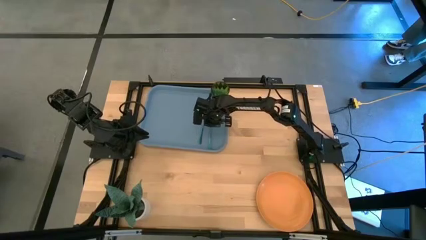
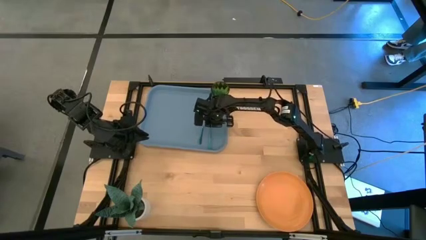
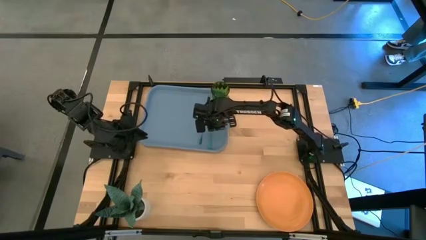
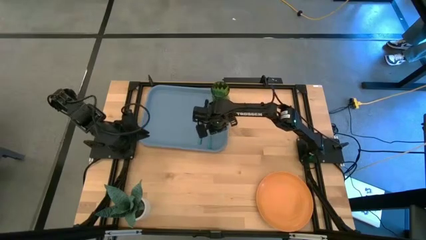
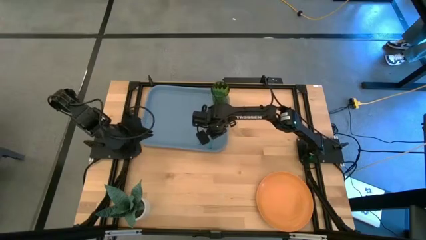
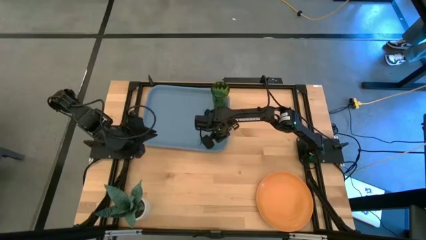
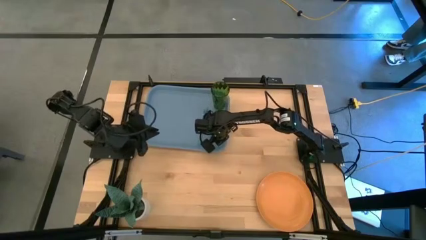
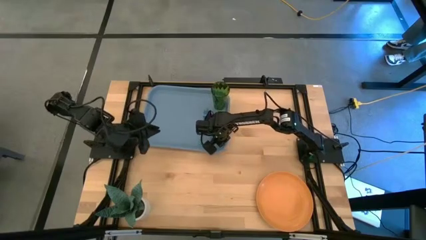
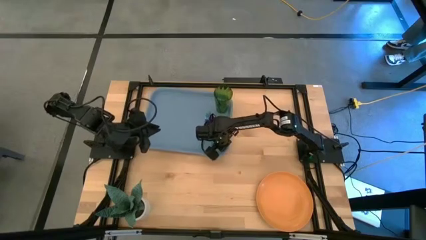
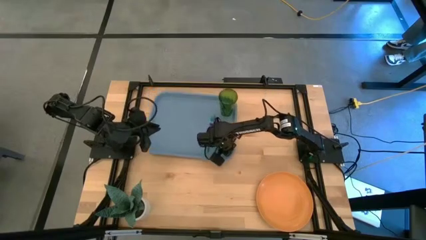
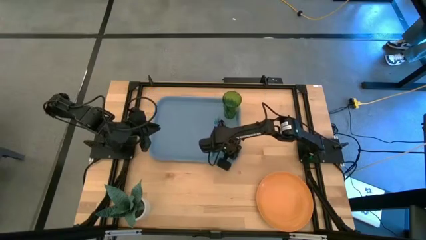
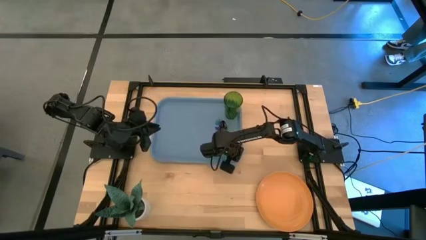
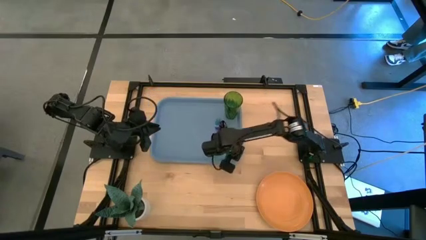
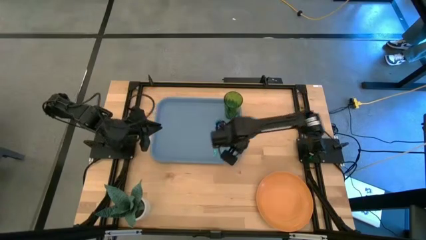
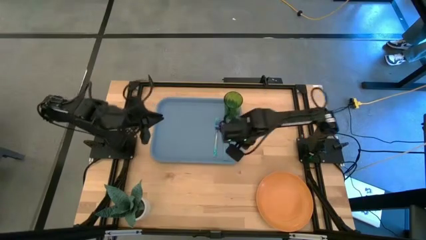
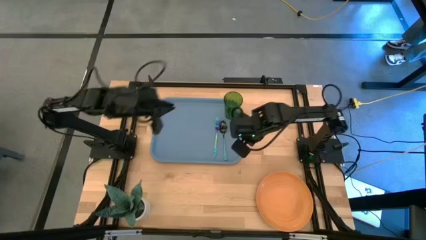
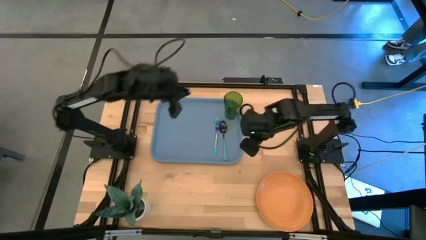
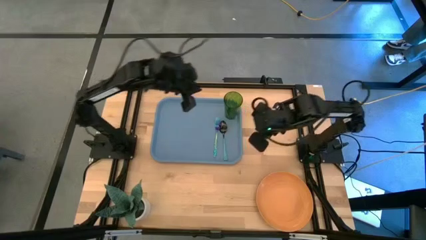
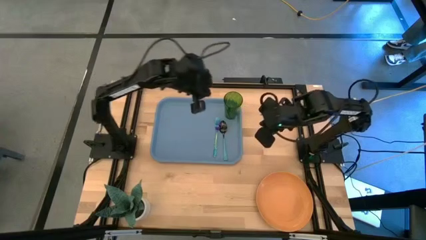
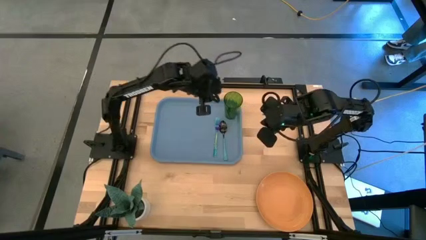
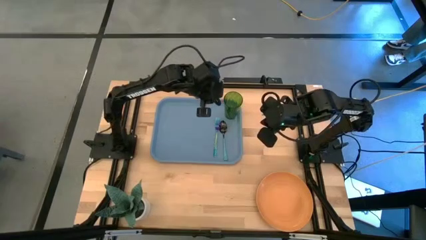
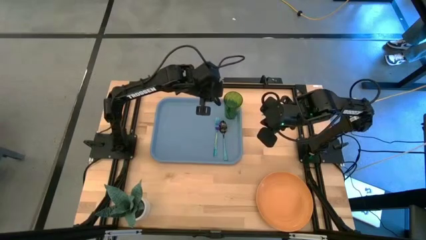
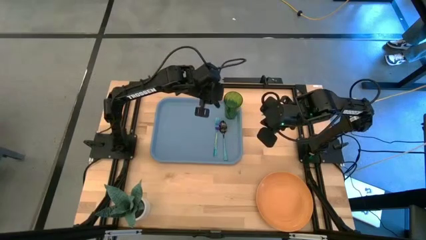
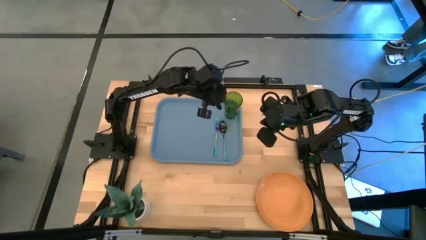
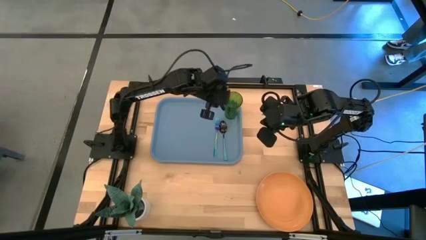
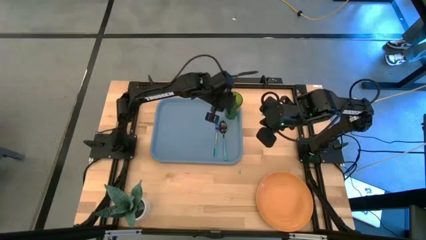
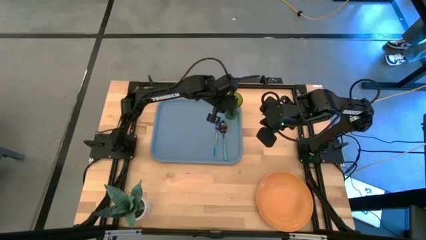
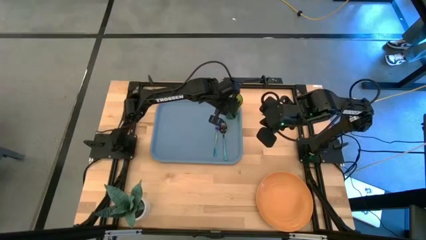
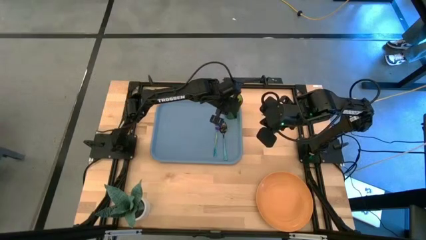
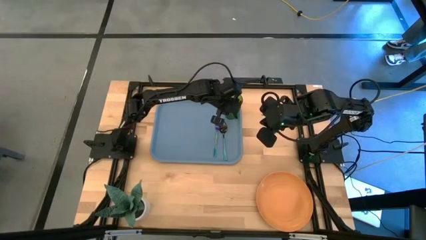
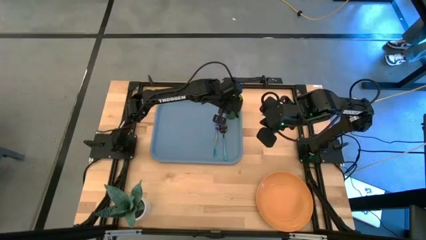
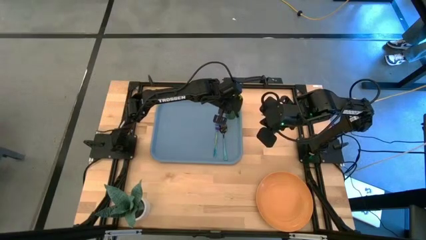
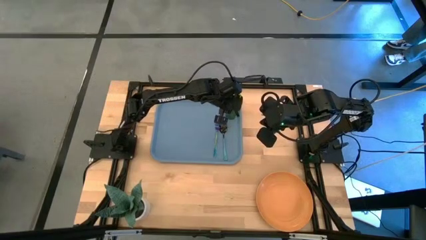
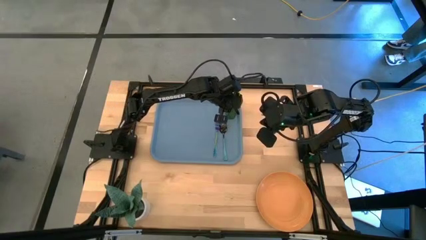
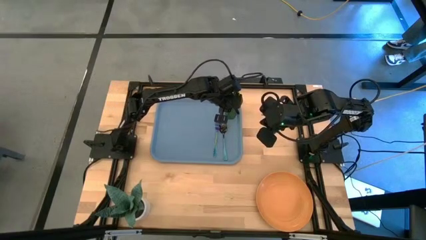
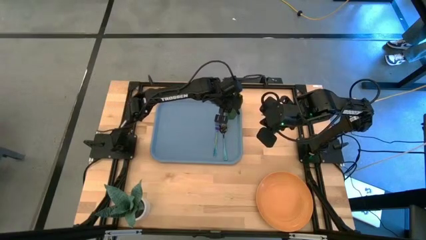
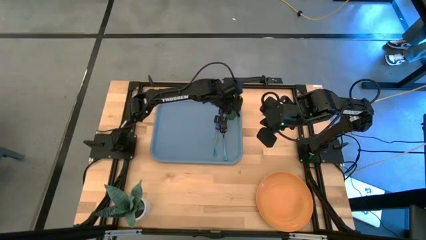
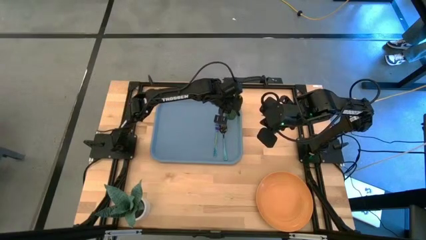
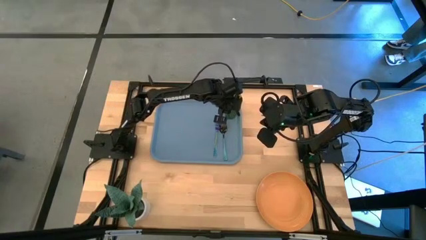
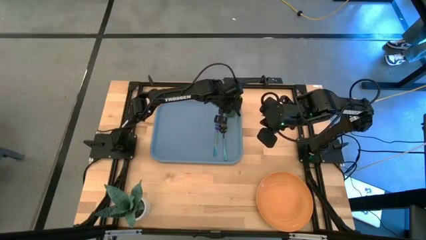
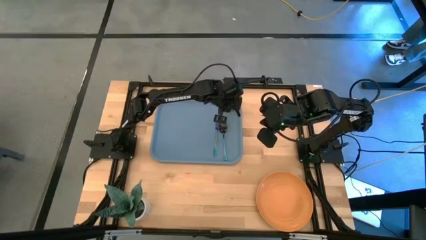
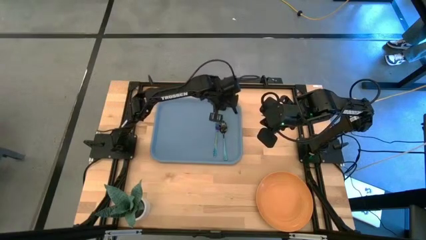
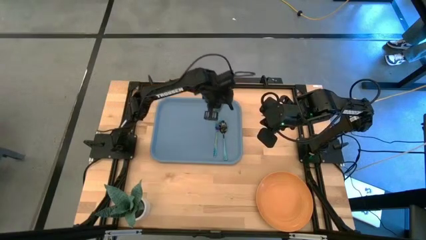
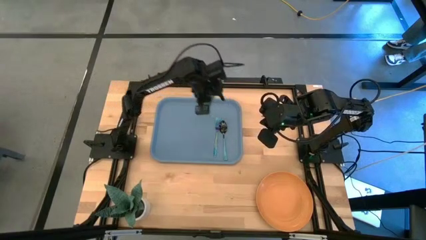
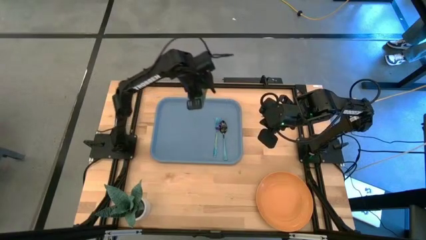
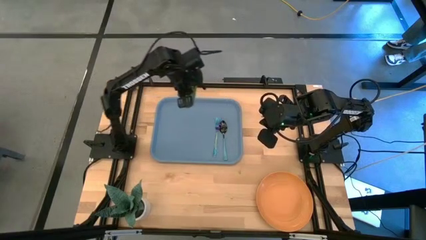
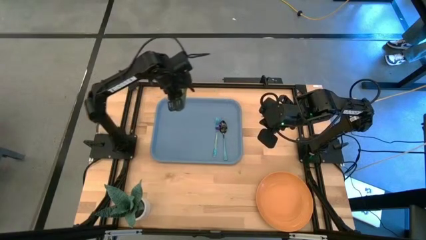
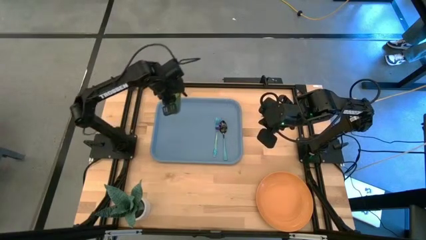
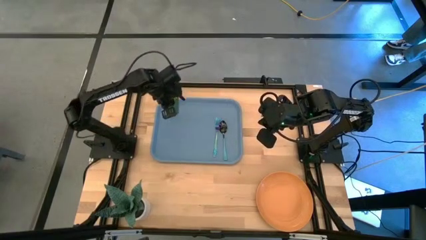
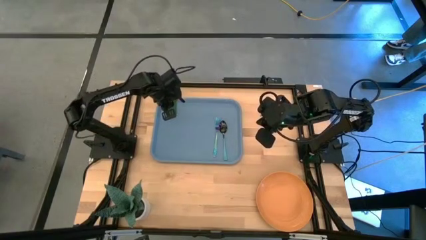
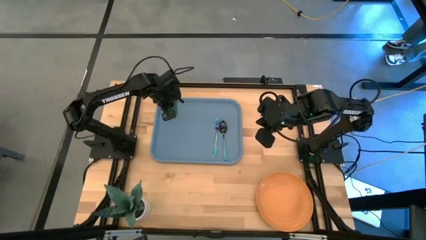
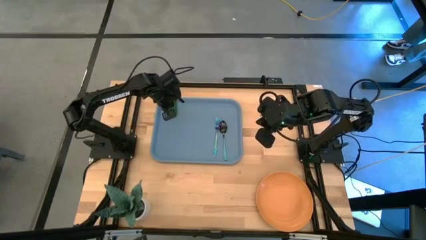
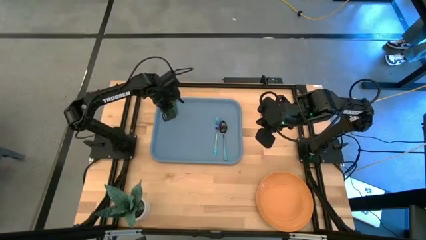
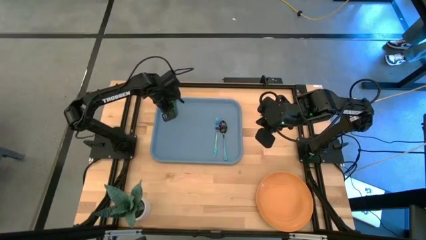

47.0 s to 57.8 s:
Task: Pick and place plate/cup/fork/spoon on tray
Move the green glass to the top left of the blue tray

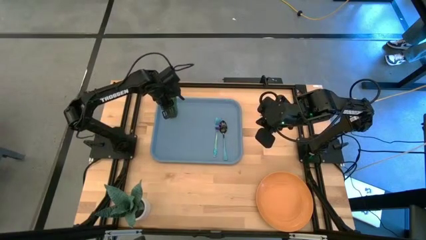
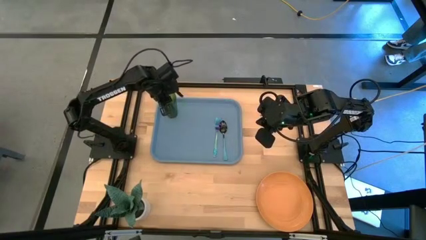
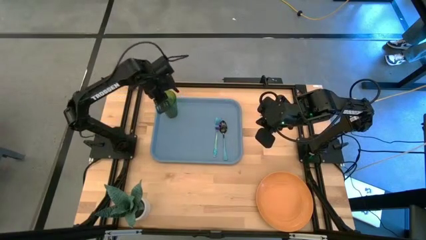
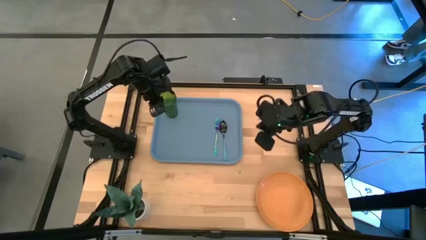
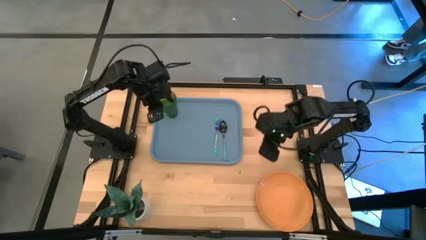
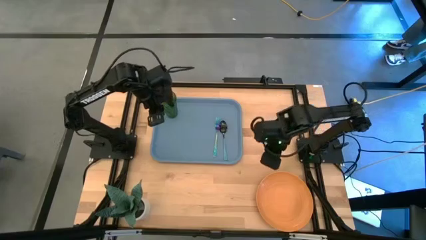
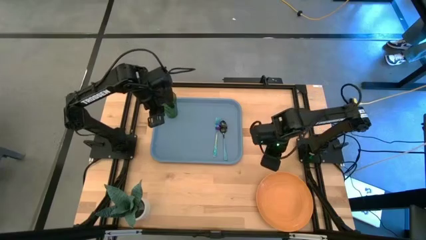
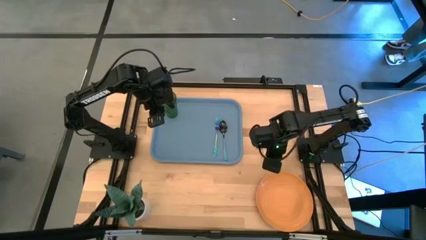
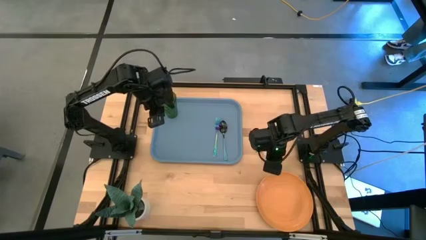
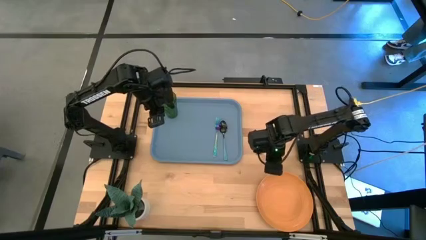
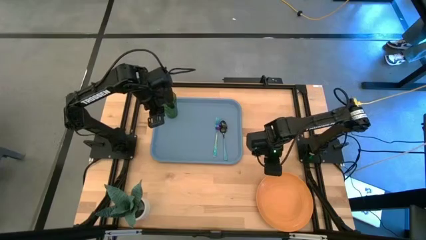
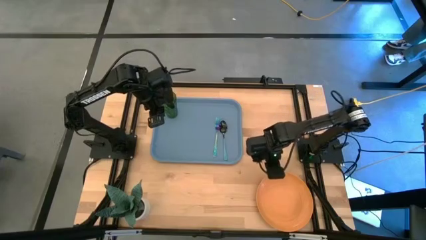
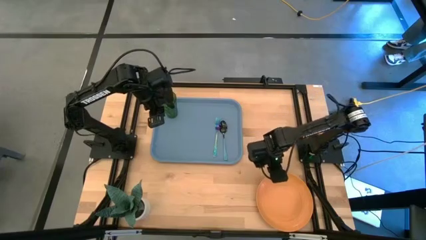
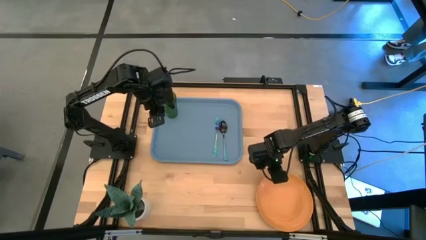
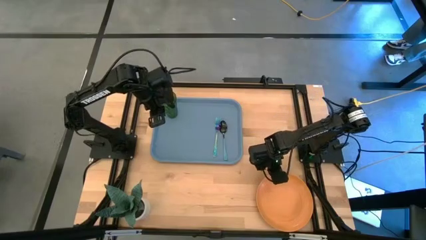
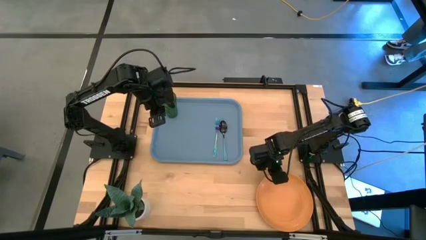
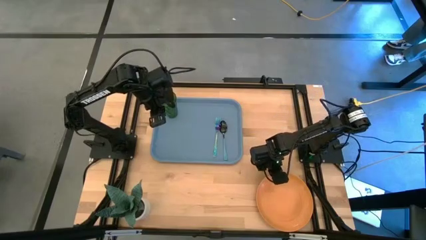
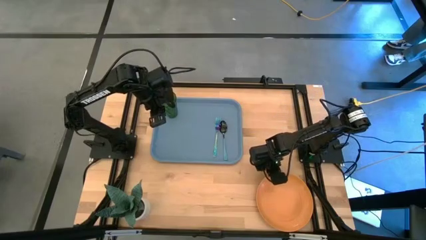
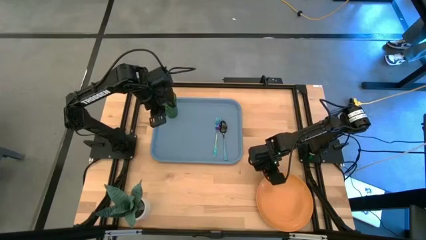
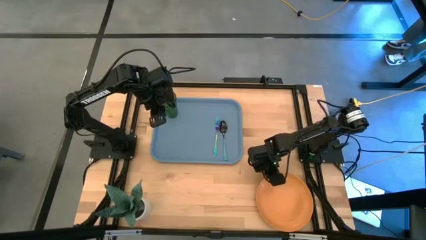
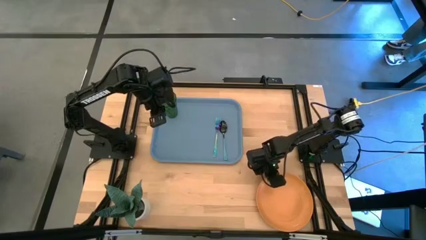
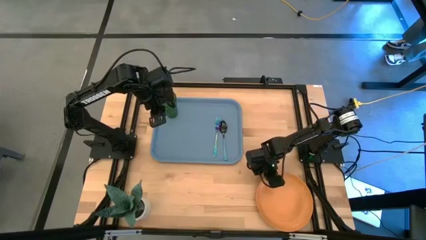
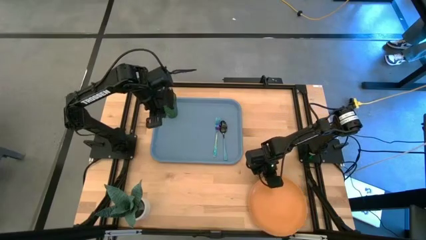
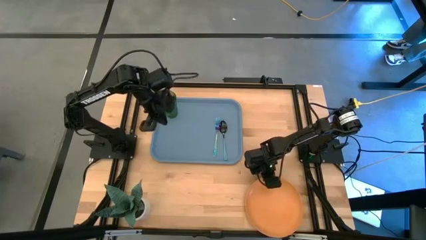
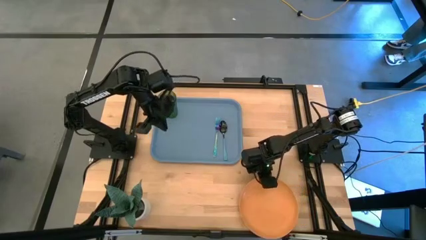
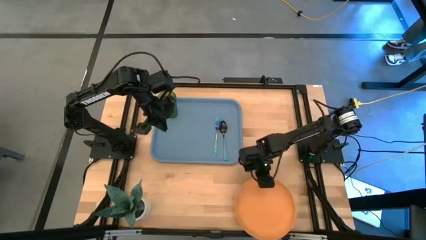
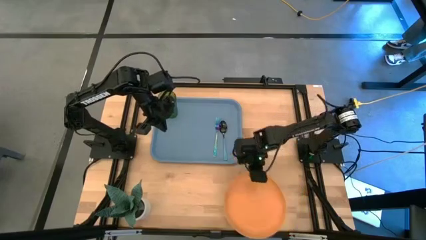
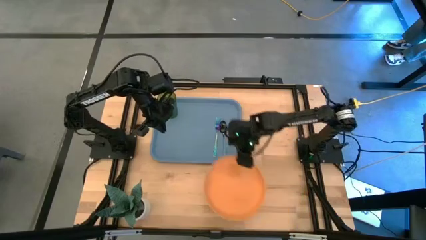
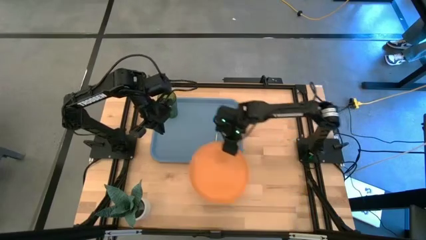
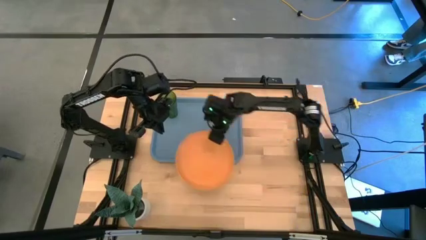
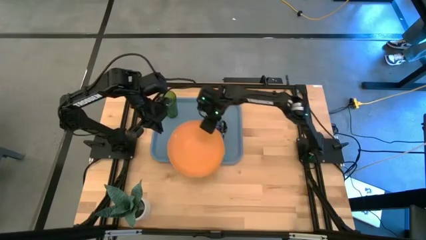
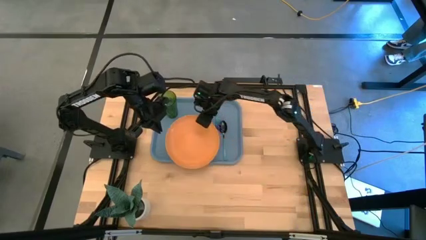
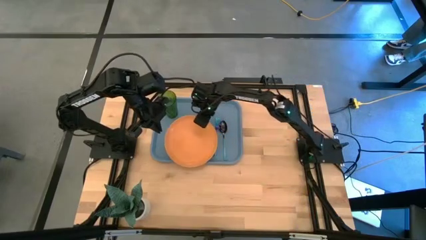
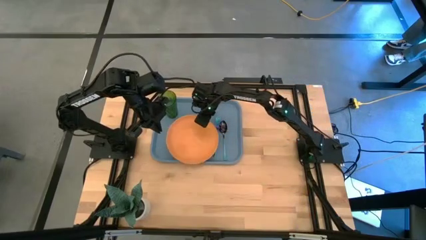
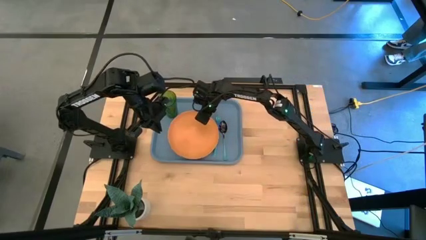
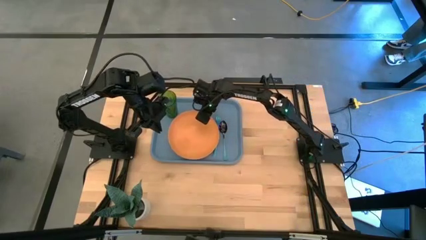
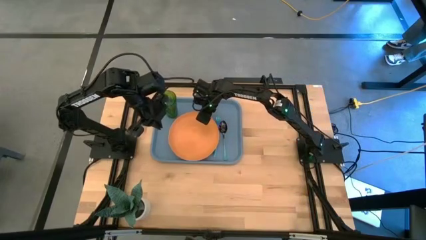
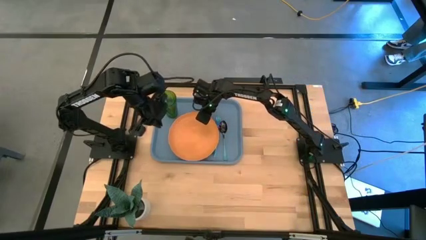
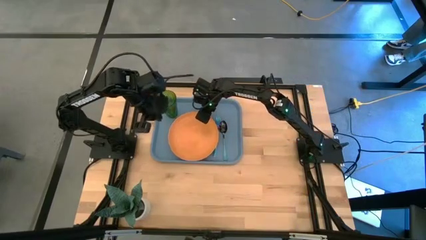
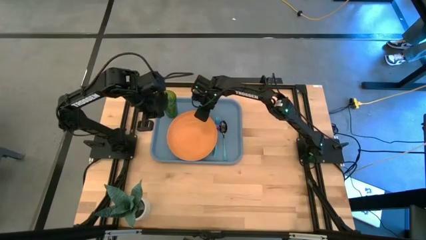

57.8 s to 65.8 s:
Put the orange plate on the blue tray to the left of the blue fork
